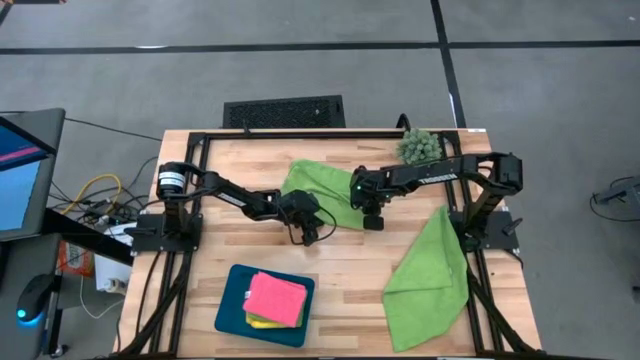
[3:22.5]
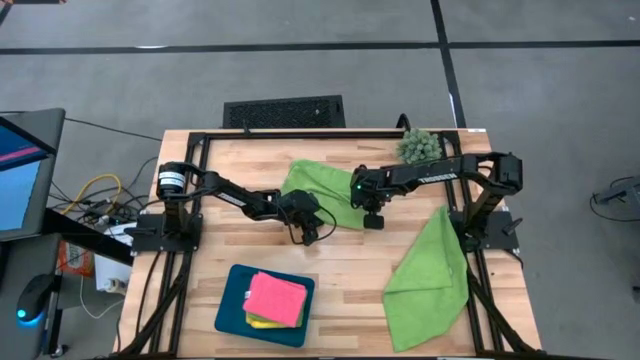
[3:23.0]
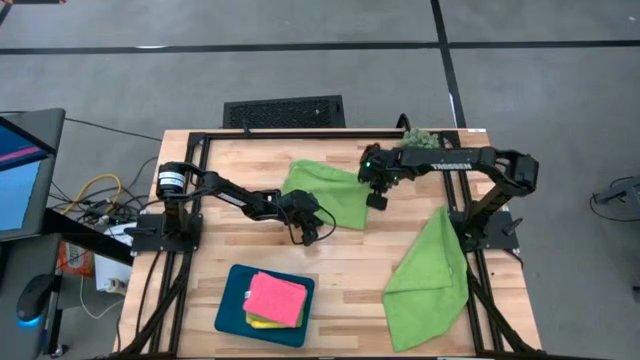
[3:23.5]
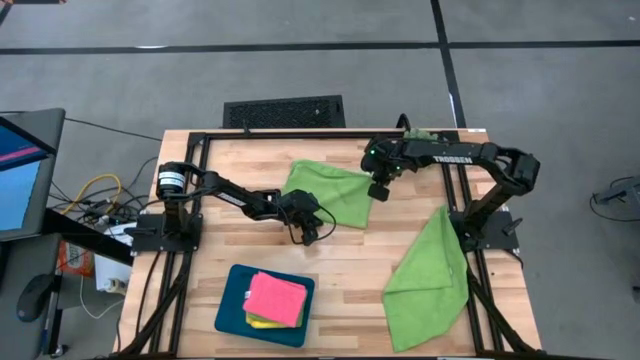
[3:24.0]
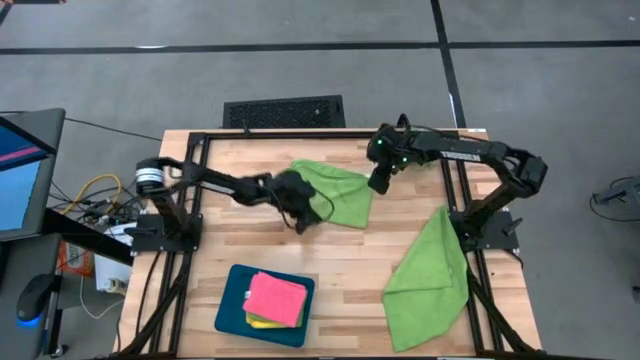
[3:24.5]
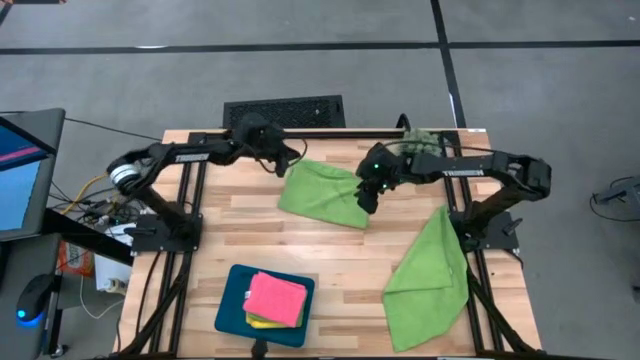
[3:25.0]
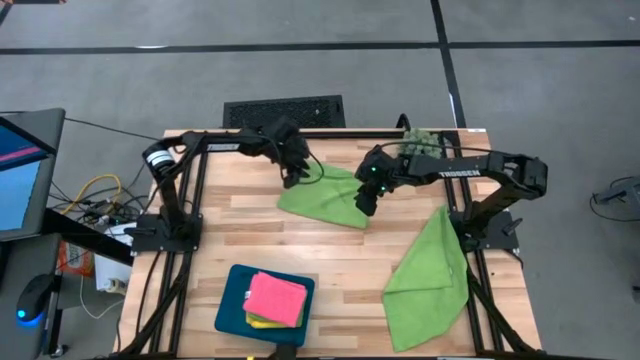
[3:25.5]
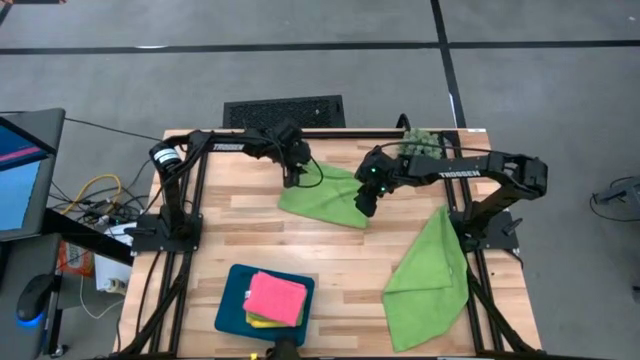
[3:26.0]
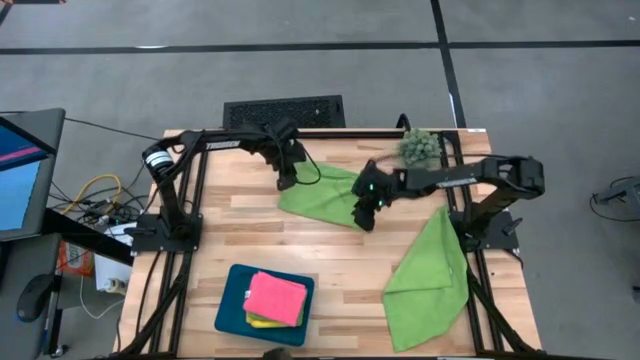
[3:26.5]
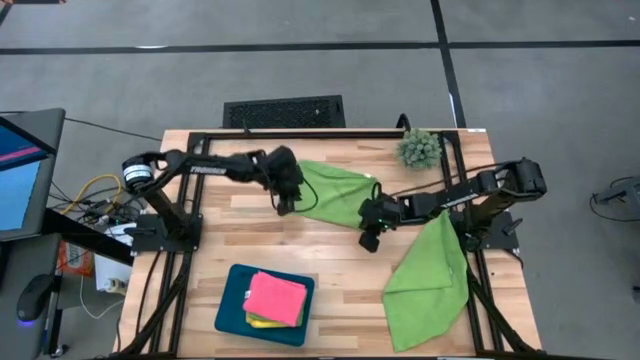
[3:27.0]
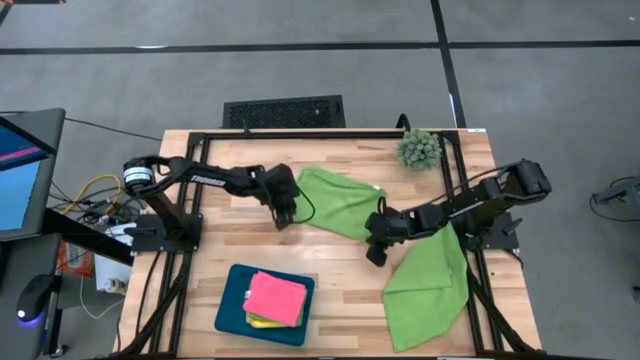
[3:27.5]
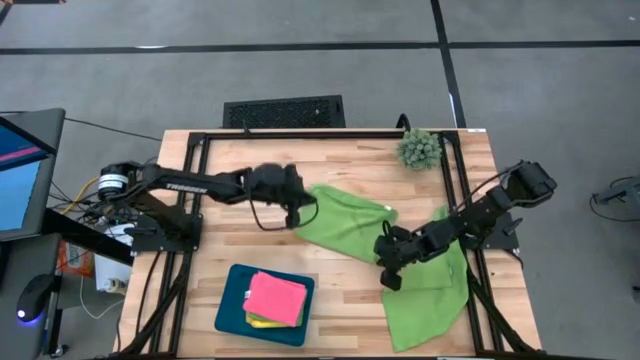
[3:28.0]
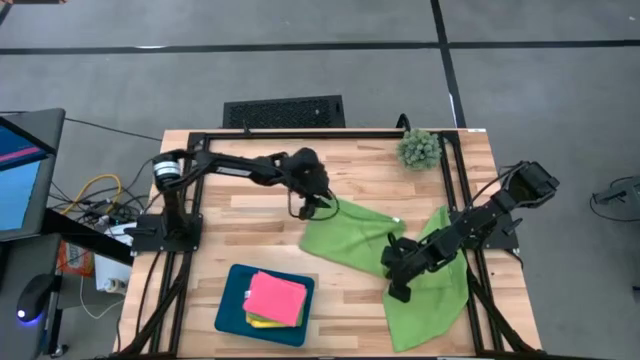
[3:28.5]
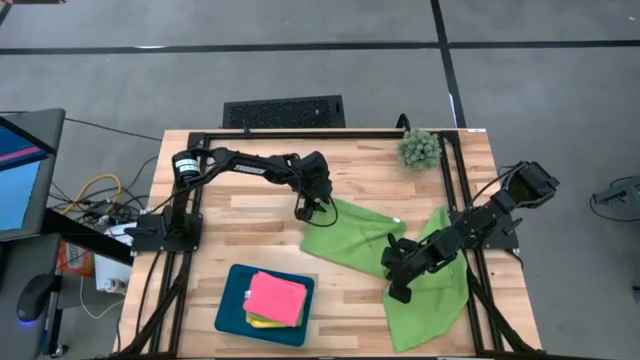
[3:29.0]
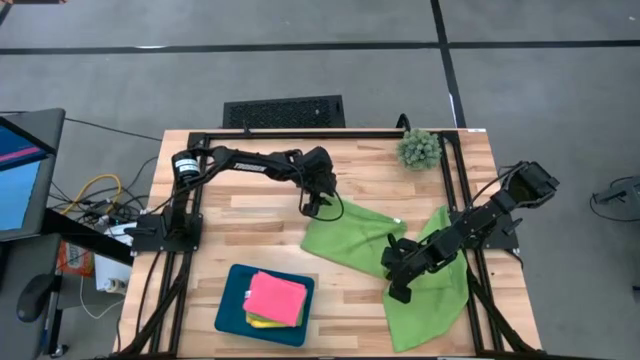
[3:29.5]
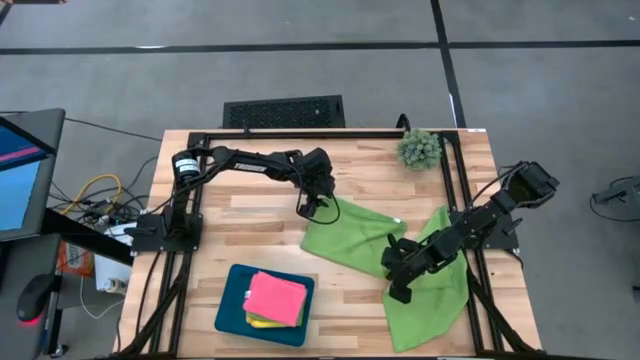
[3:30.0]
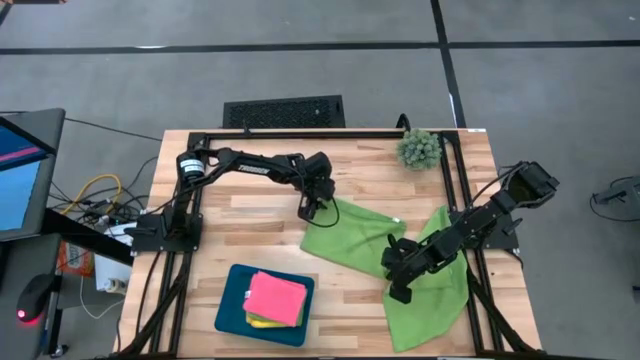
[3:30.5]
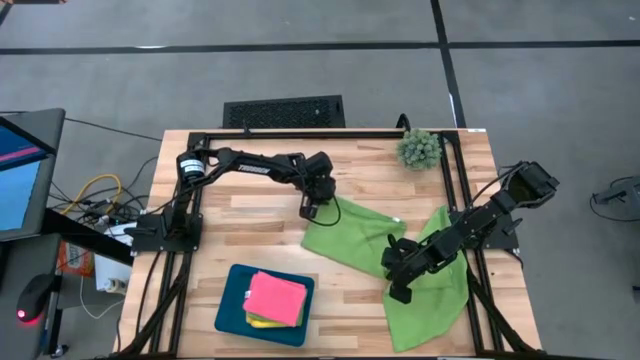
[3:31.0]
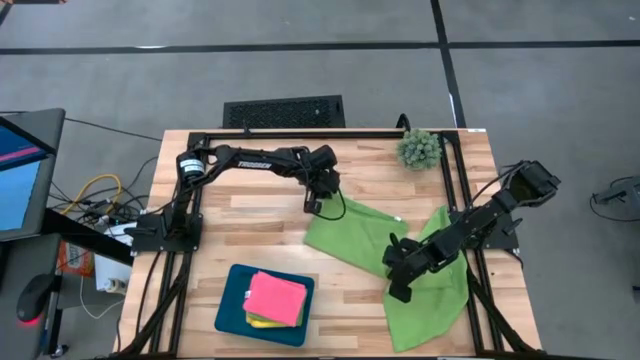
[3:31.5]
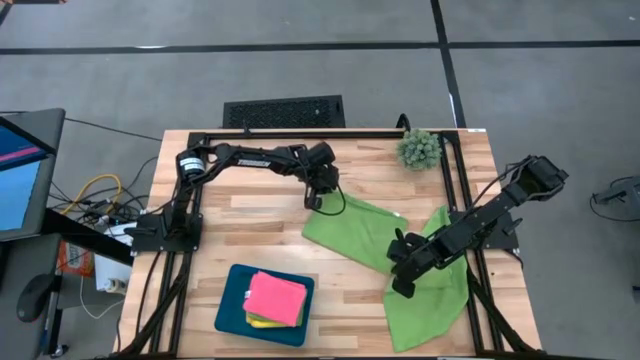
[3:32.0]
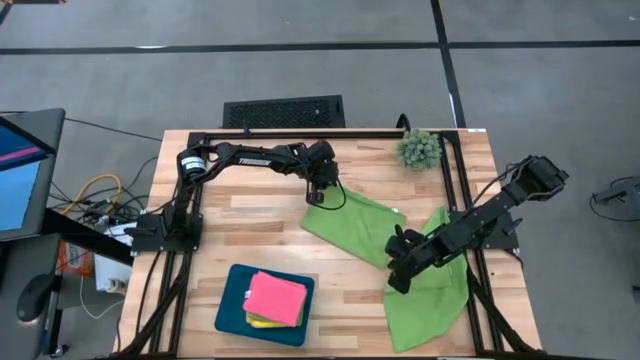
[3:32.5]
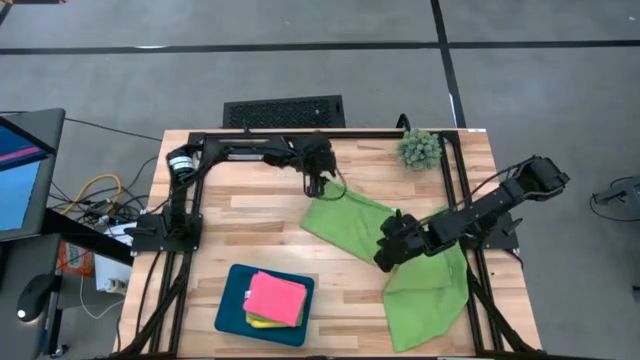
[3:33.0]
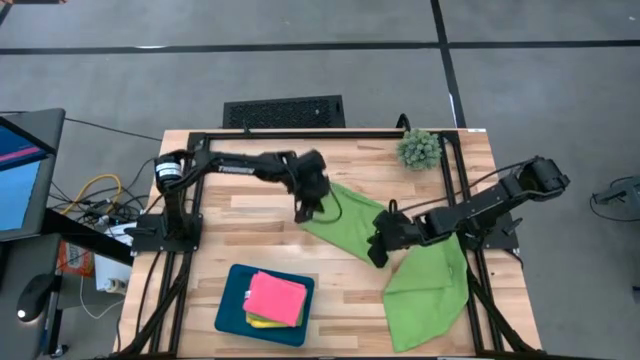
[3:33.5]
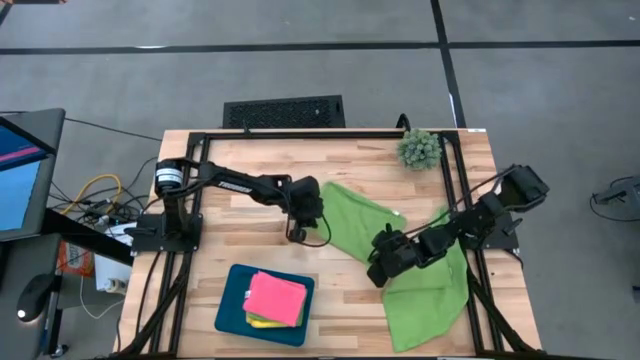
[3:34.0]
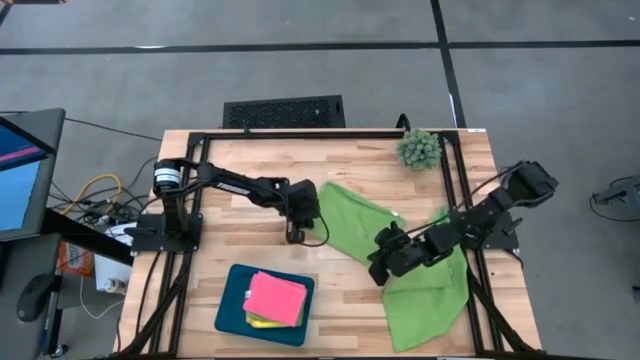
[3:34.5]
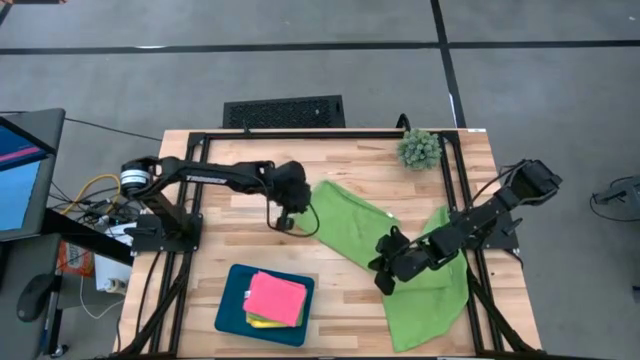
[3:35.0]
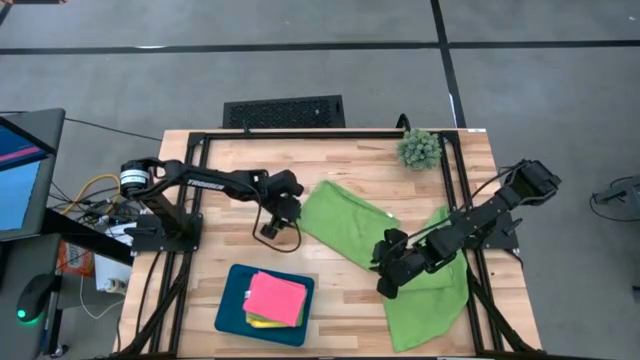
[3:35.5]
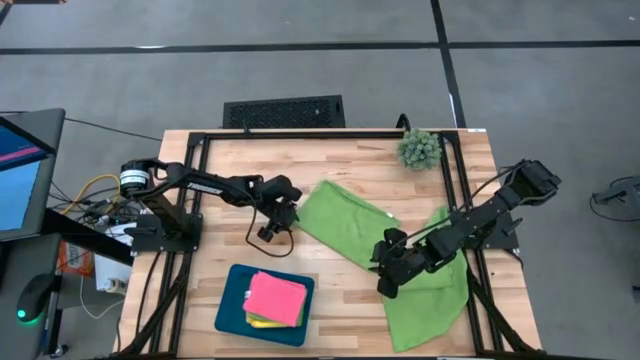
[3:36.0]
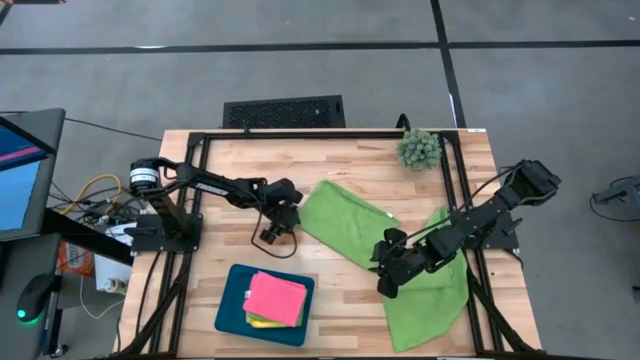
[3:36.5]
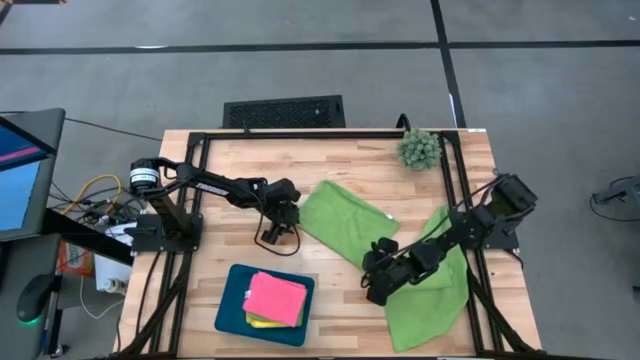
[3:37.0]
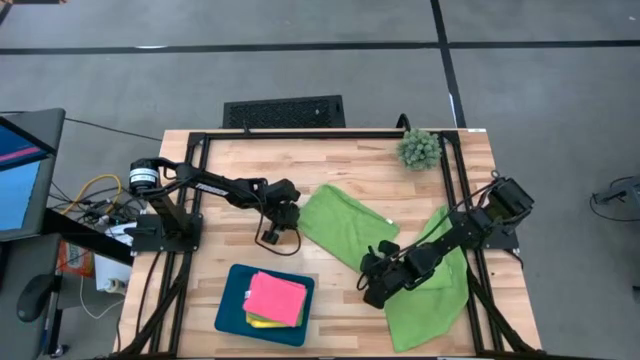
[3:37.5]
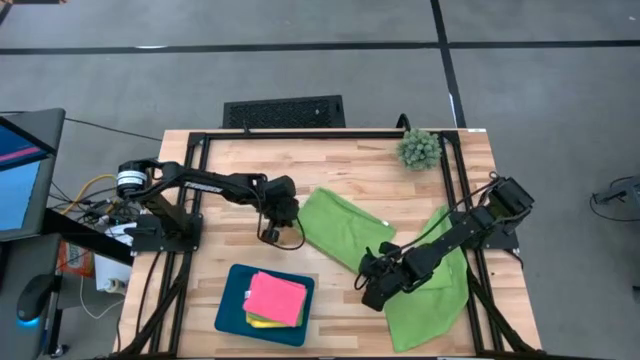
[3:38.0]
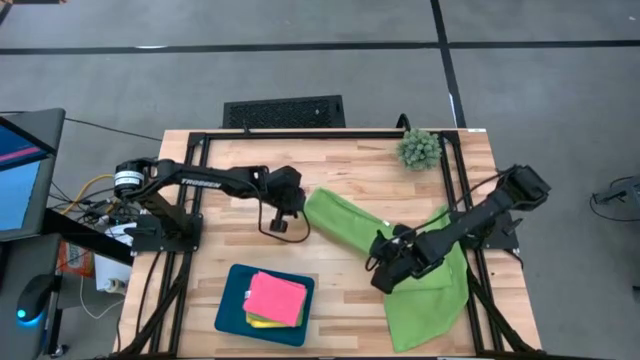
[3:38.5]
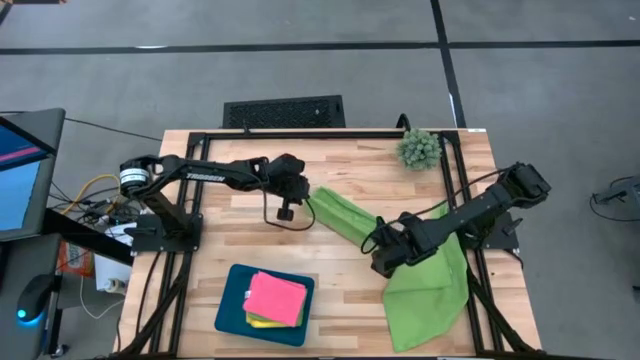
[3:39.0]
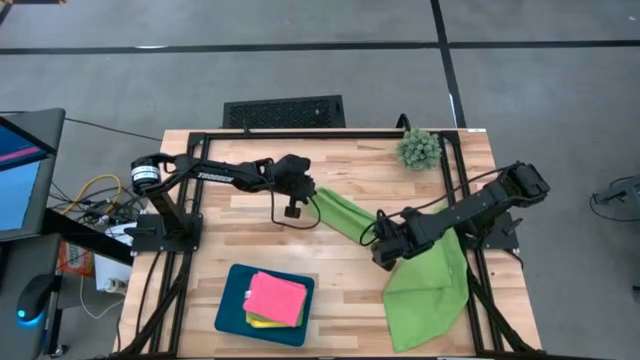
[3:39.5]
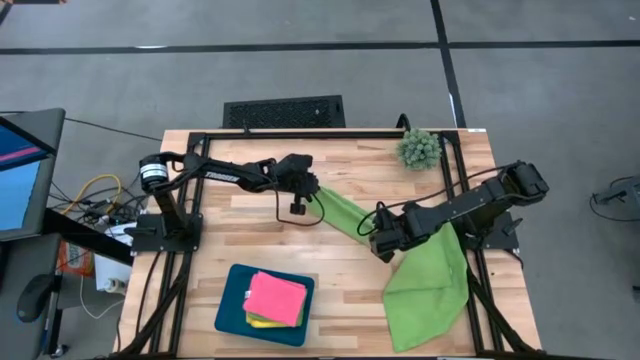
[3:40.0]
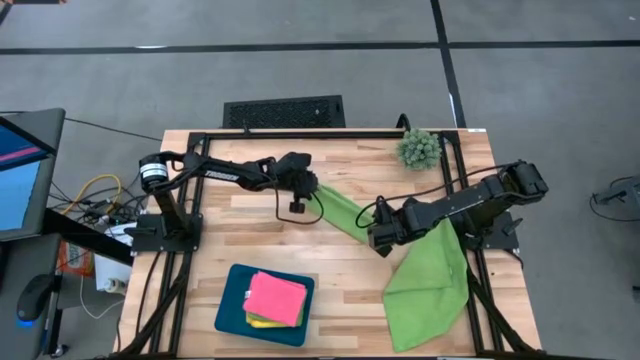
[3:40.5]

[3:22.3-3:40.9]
Task: Fold microfiber towels
Fold the top green microfiber towel on the table

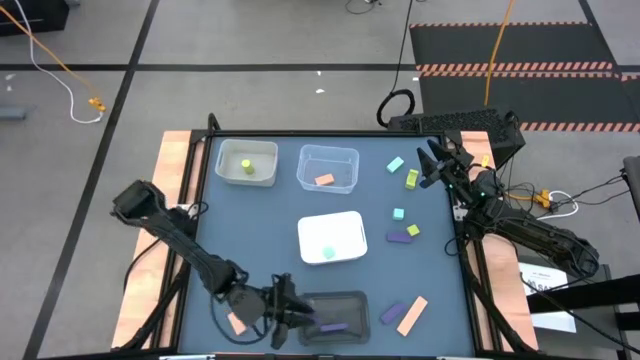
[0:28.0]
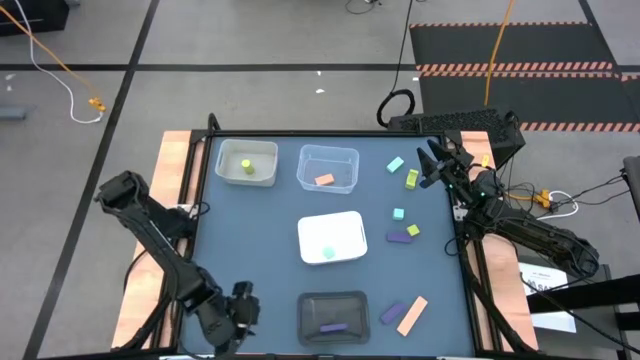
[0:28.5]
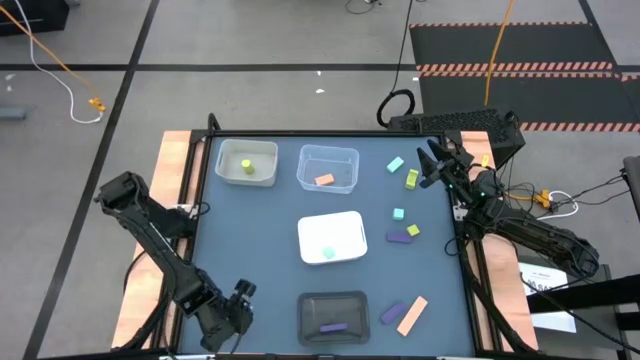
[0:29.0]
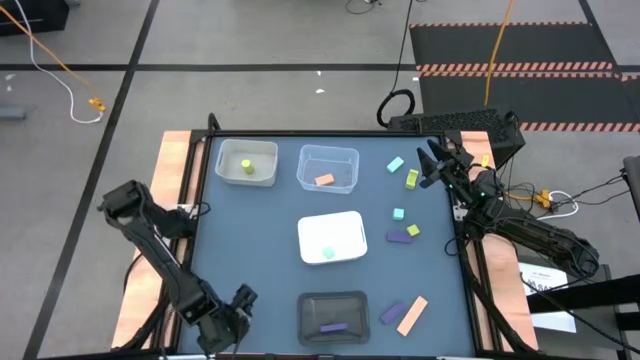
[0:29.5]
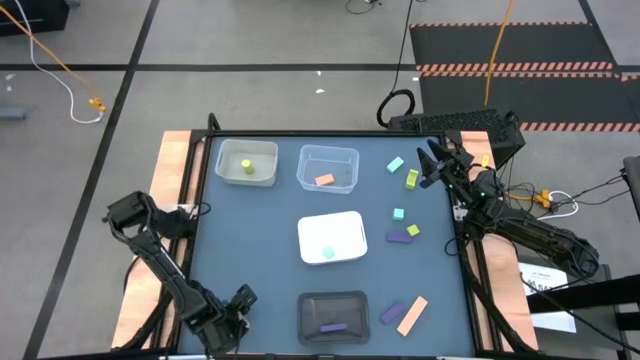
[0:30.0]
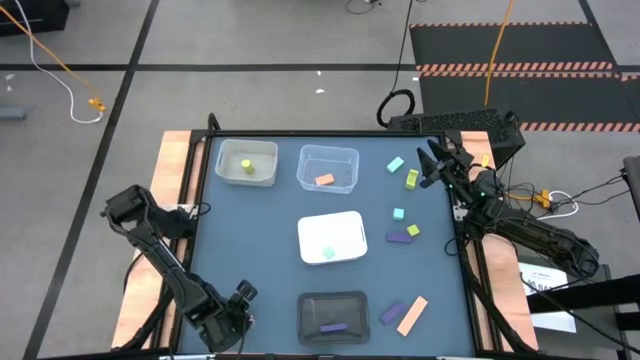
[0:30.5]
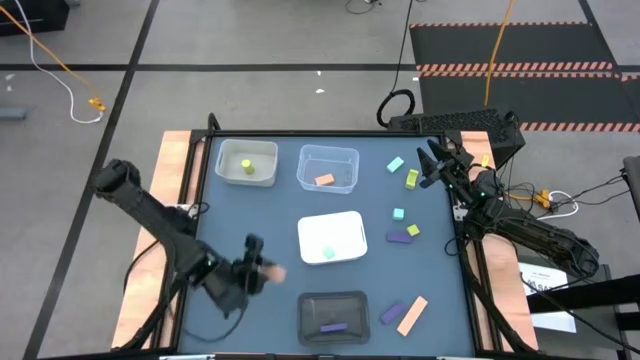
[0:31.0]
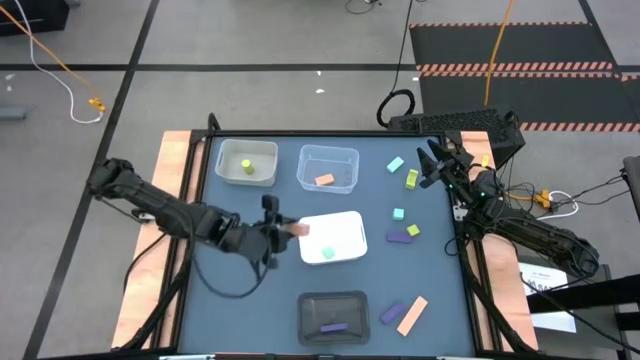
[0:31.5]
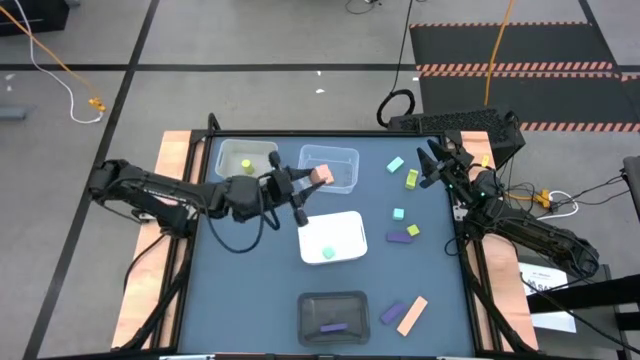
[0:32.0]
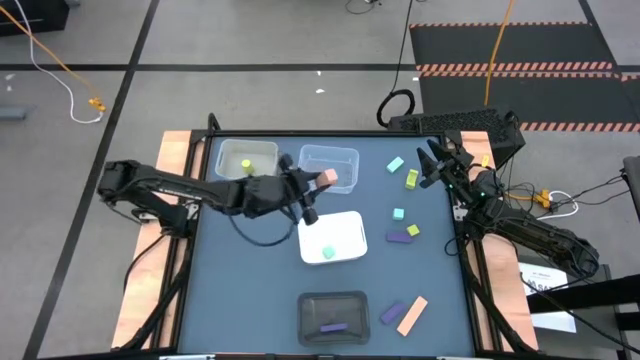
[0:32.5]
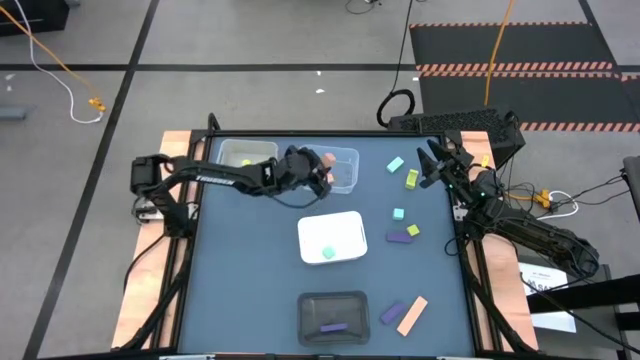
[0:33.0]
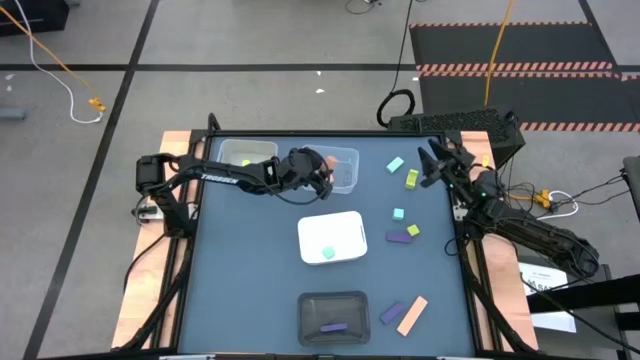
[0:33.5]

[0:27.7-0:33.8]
Task: Sort & place blocks by color
Put the left brown block into the transparent bin
